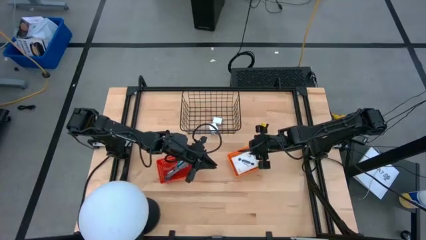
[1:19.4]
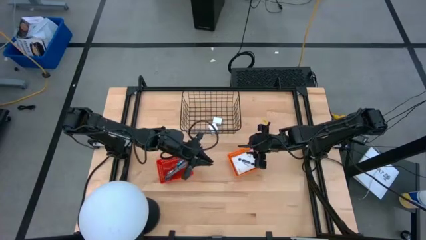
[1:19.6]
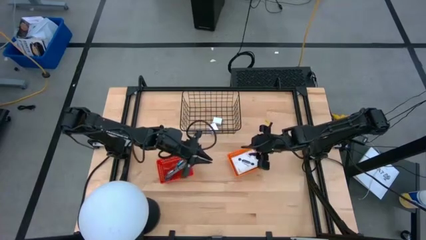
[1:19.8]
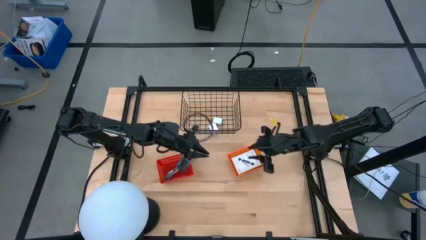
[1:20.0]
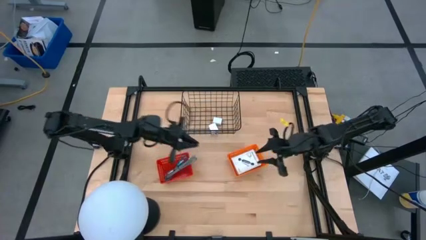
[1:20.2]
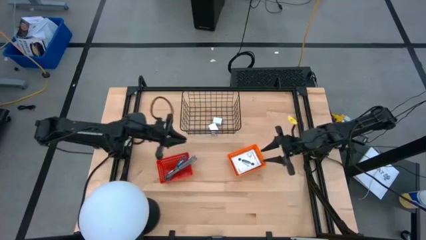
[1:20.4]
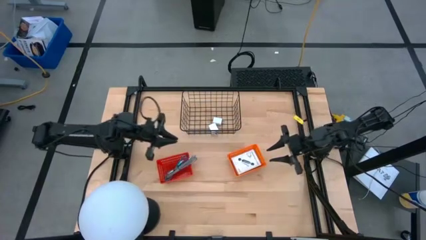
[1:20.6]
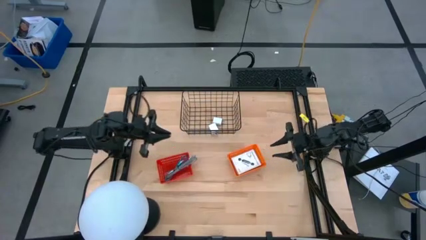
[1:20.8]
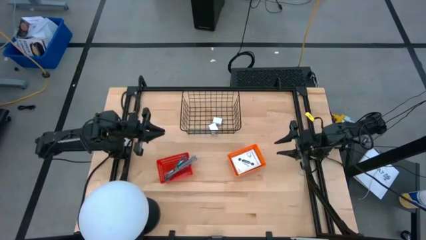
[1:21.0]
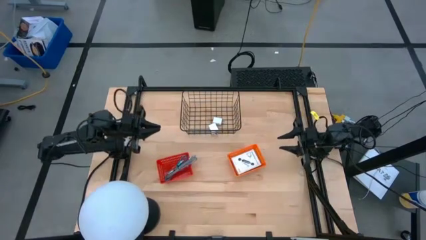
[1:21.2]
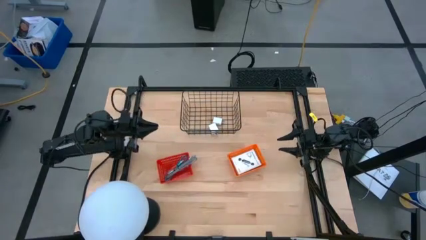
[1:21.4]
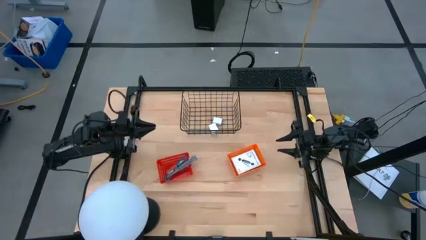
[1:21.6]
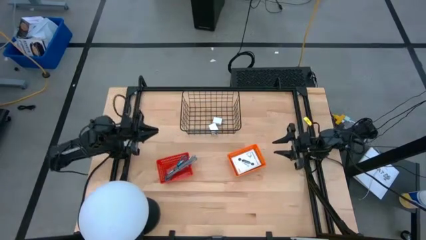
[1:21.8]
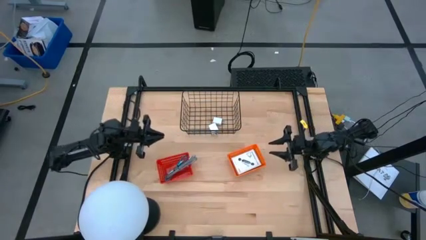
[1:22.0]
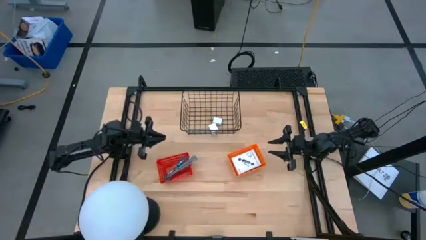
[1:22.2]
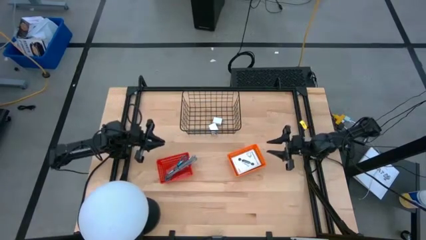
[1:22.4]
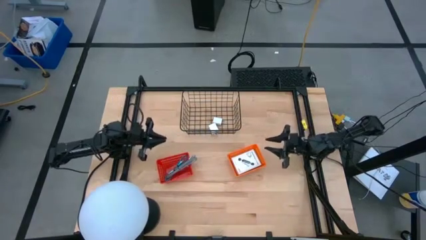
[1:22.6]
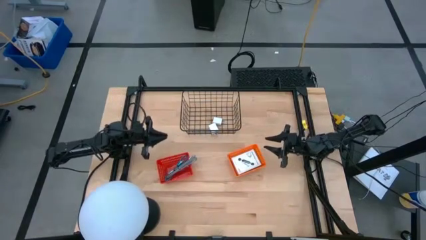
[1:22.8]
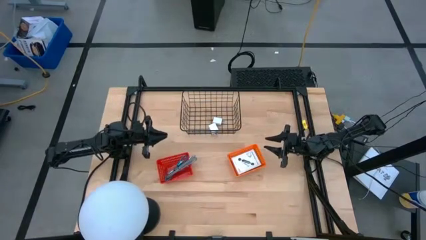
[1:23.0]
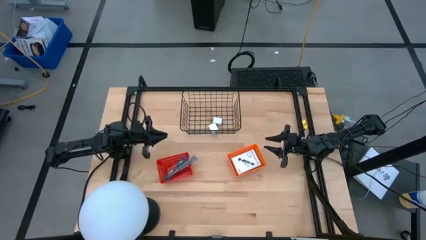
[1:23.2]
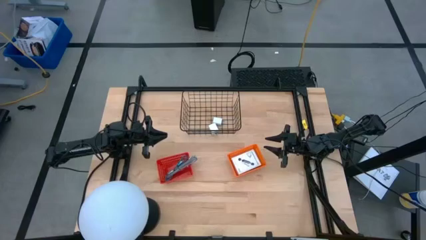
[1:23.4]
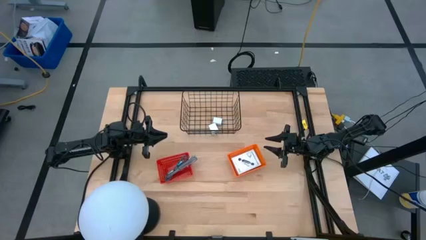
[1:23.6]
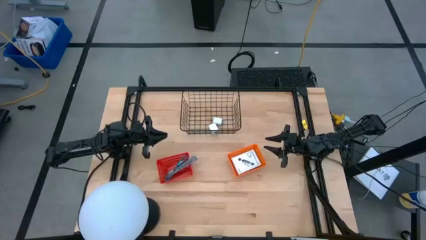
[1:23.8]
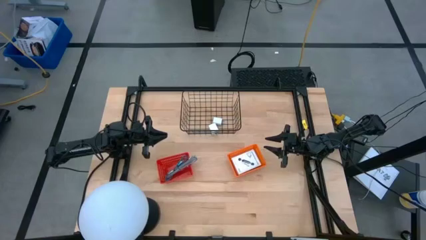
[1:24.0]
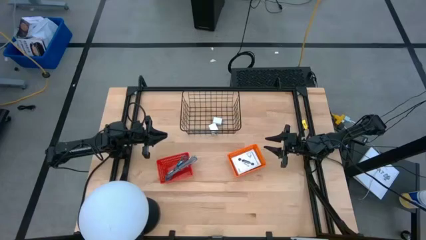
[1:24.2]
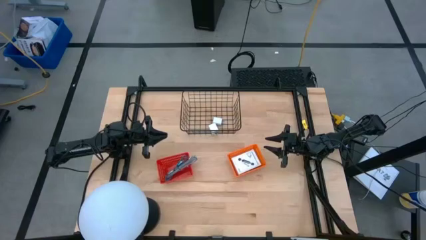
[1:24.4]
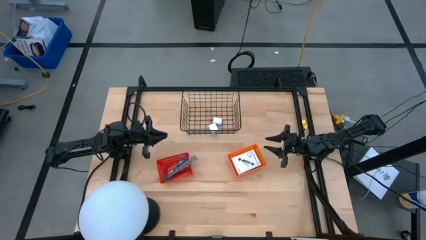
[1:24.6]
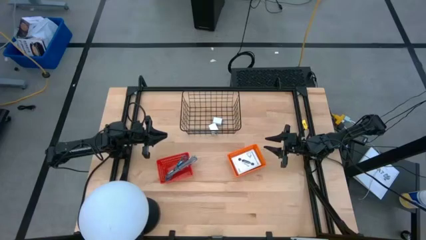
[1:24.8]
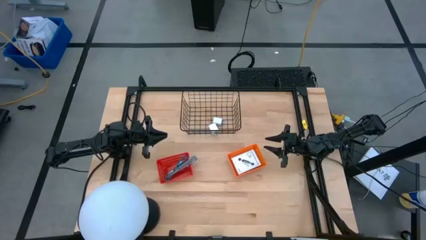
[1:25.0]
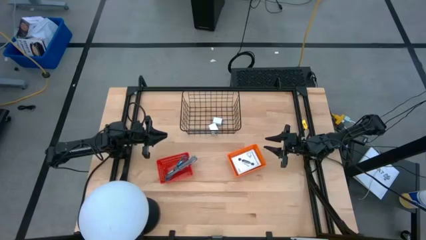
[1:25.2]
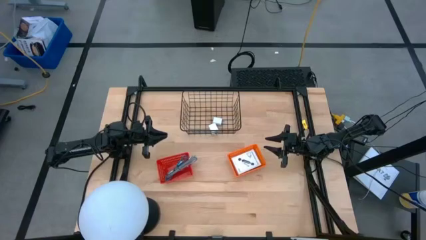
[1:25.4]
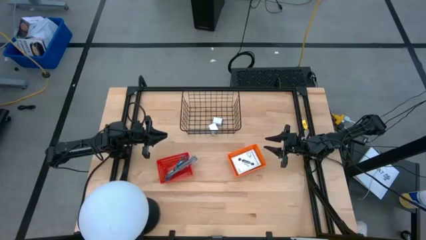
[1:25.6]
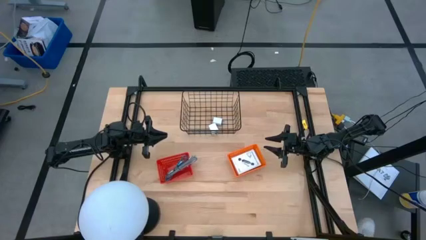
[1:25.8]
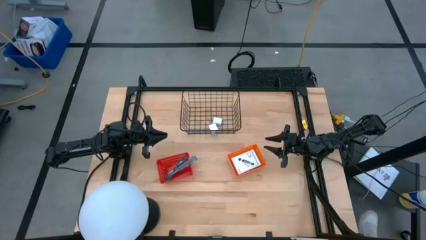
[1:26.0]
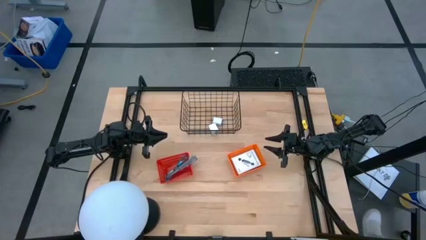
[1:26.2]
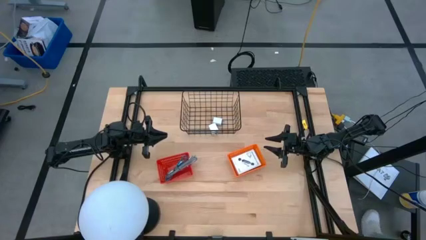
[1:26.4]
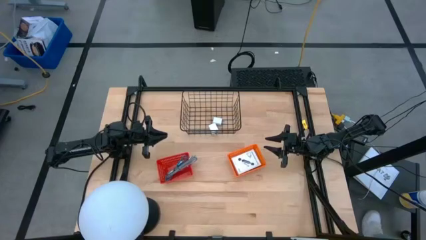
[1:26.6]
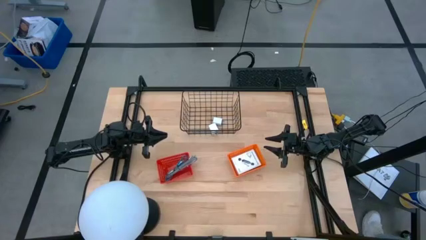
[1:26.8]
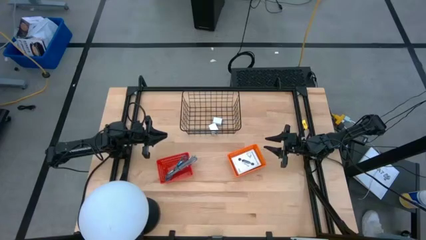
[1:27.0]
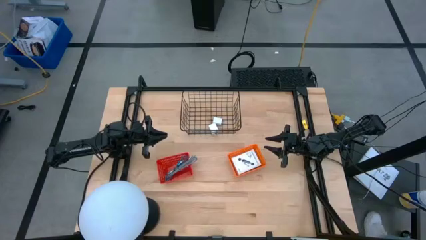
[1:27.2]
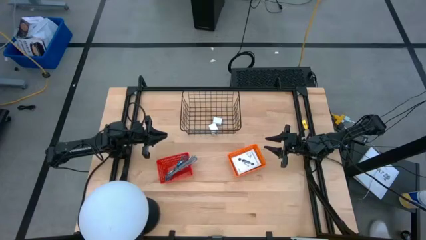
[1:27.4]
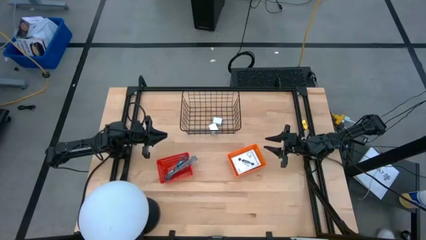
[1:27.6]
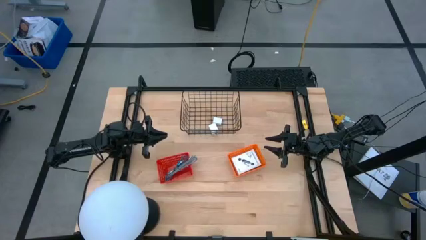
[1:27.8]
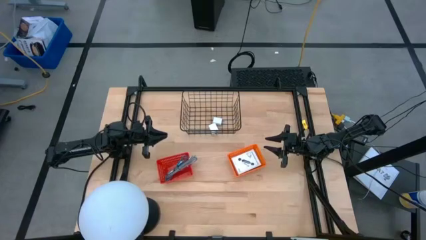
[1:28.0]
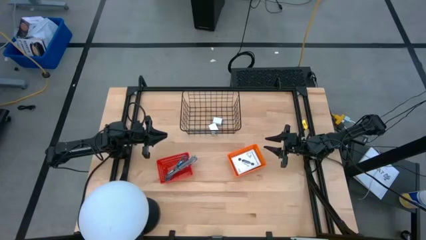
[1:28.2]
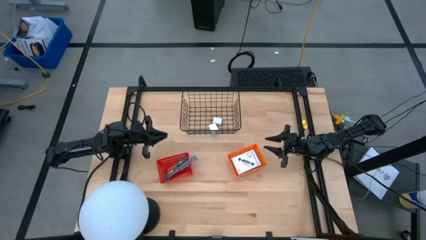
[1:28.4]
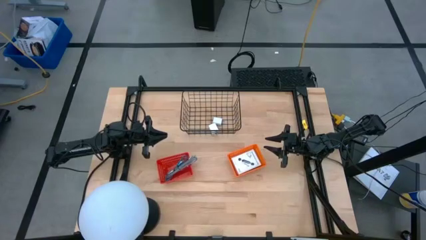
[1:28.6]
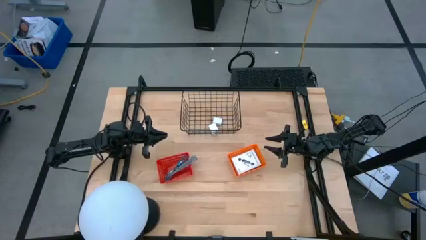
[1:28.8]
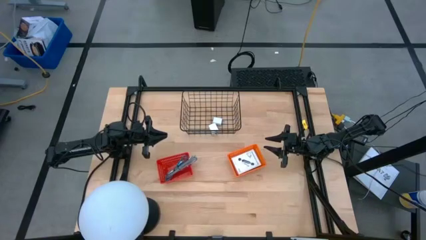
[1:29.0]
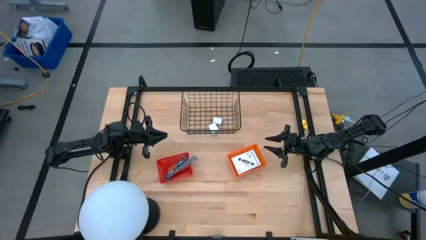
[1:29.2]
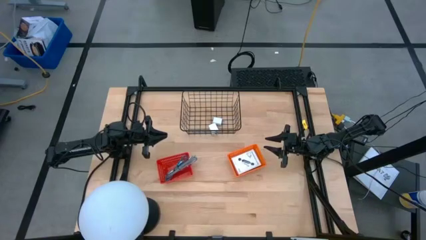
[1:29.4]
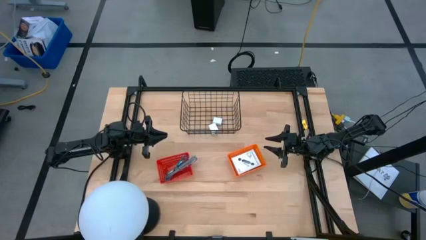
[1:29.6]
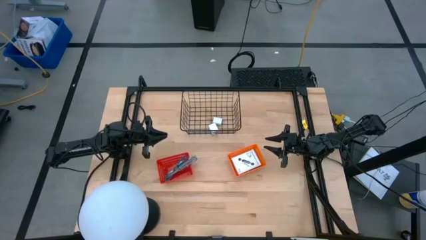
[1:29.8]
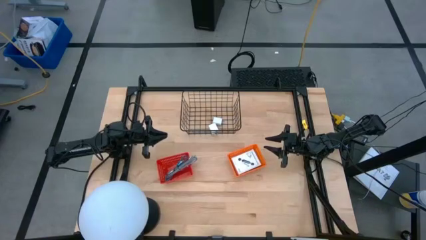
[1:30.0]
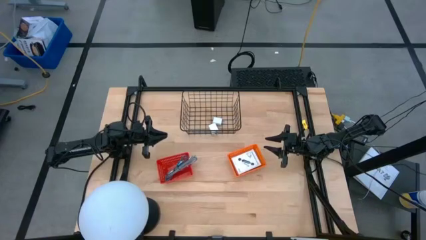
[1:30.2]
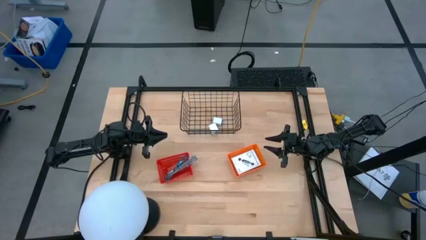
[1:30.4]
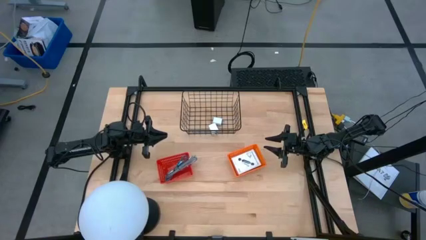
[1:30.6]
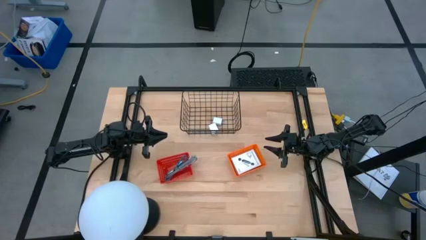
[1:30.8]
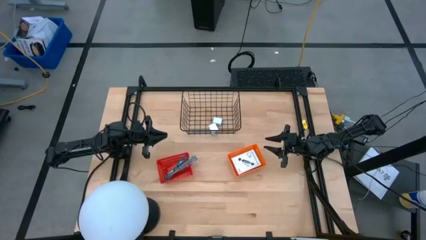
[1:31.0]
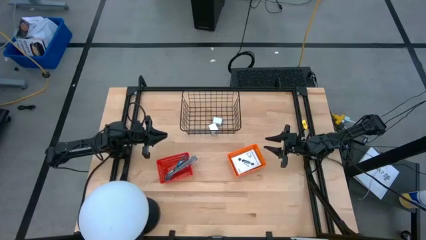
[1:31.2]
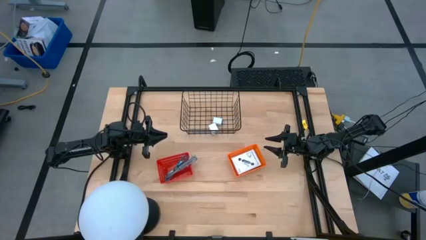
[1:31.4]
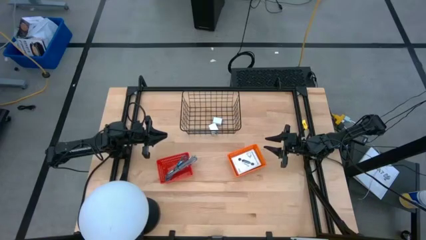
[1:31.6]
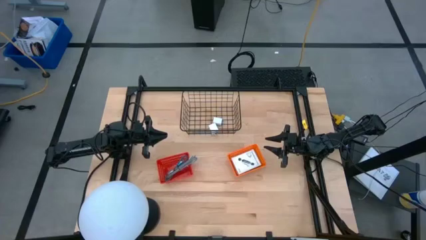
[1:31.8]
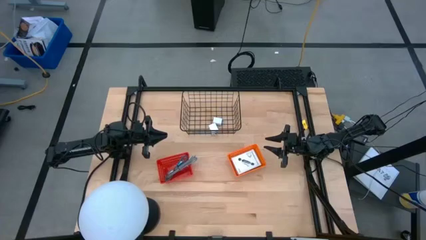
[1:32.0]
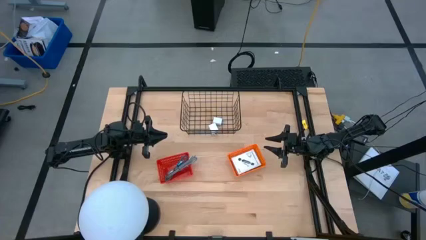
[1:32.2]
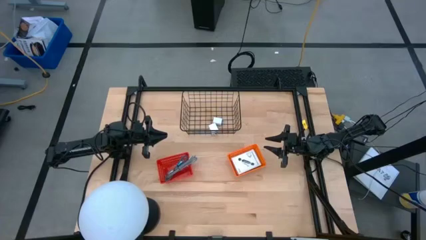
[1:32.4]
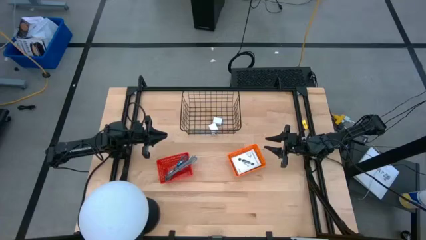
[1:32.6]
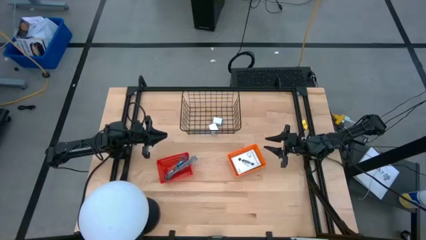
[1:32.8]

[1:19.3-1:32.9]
Task: Pick and place items into bin
Return to Home Position

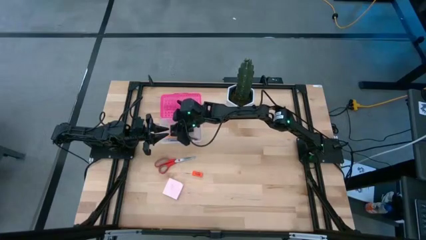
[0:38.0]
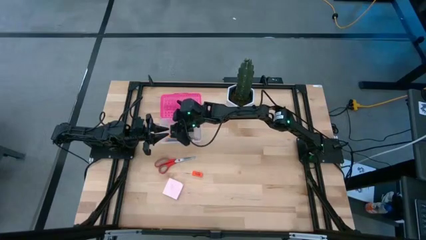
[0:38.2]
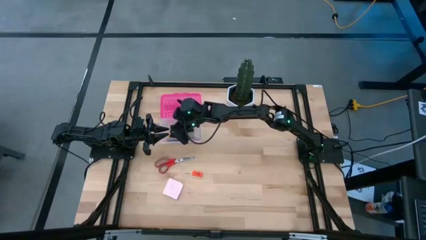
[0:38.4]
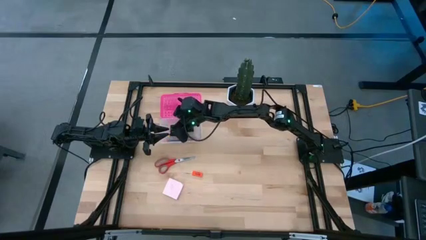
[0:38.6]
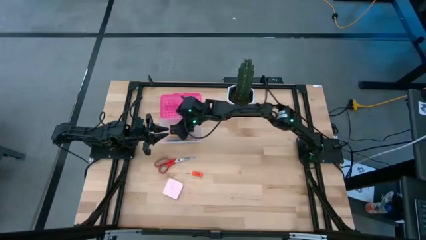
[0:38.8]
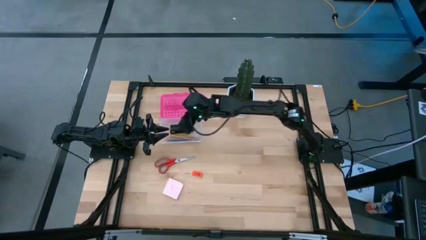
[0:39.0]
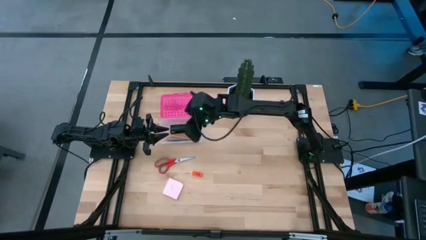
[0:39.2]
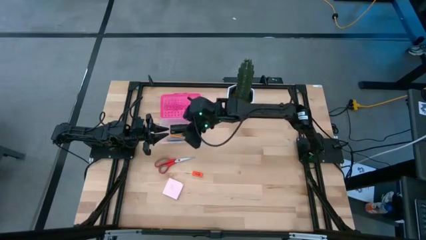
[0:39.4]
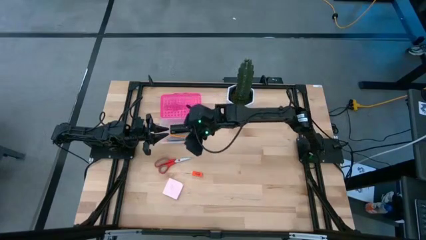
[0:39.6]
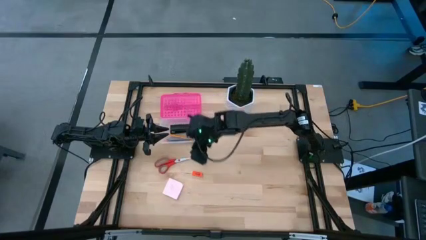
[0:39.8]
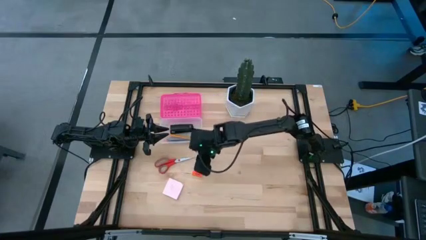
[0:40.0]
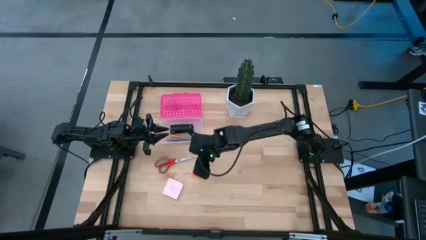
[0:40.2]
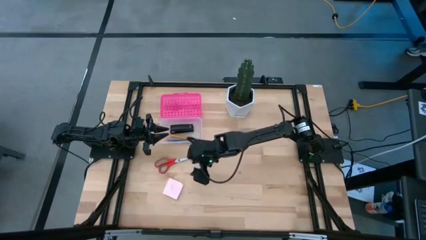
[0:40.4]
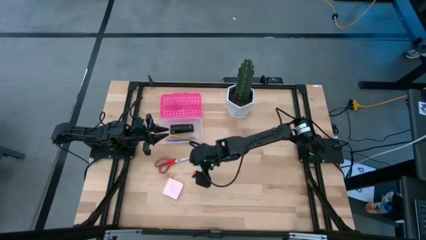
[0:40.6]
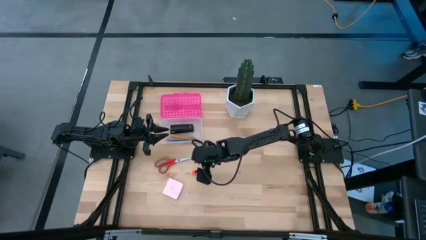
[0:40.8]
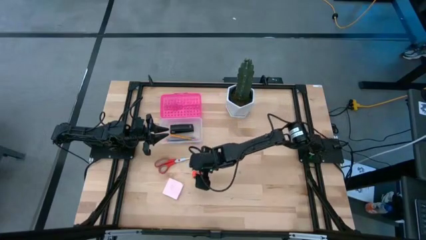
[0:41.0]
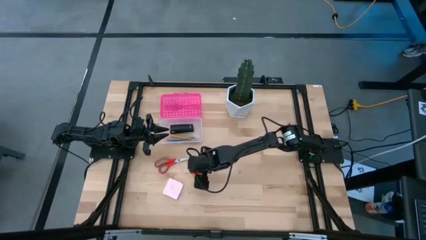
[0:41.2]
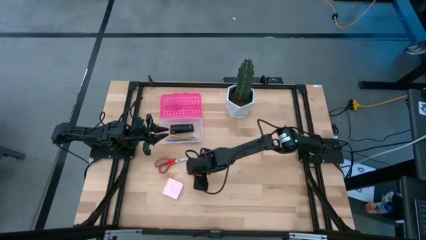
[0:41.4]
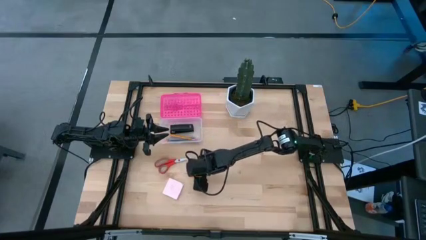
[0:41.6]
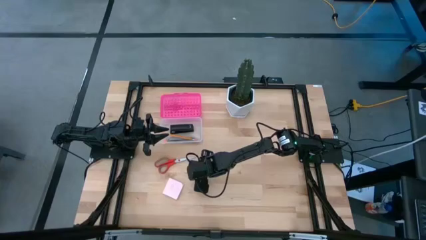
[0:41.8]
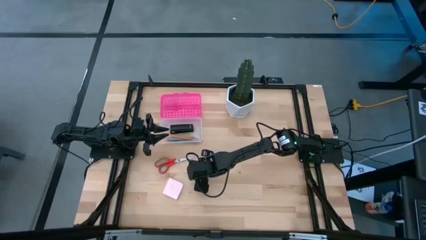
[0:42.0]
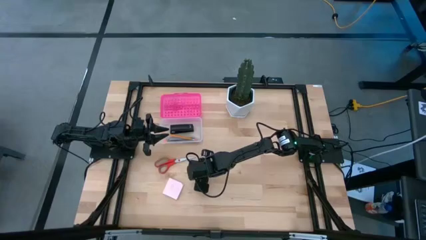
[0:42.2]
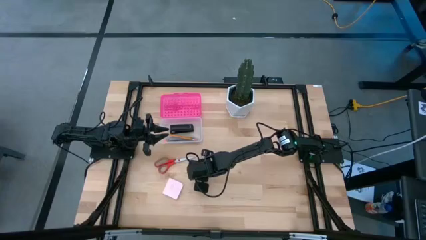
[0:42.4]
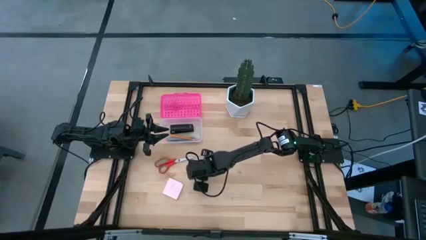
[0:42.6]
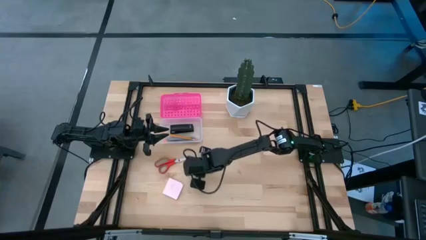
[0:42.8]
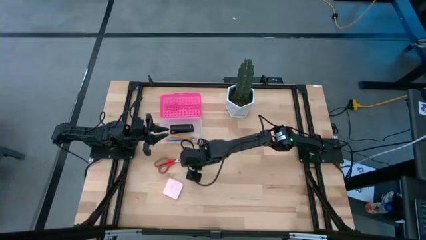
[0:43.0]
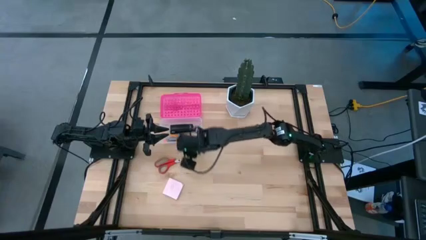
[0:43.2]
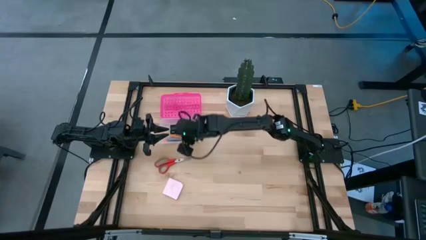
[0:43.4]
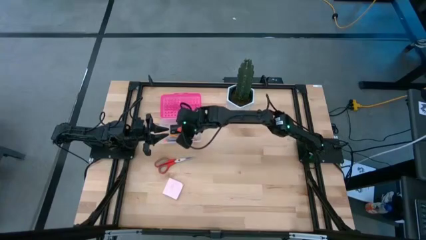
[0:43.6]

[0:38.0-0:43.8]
Task: Pack school essentials
Put the orange eraser into the supply box
